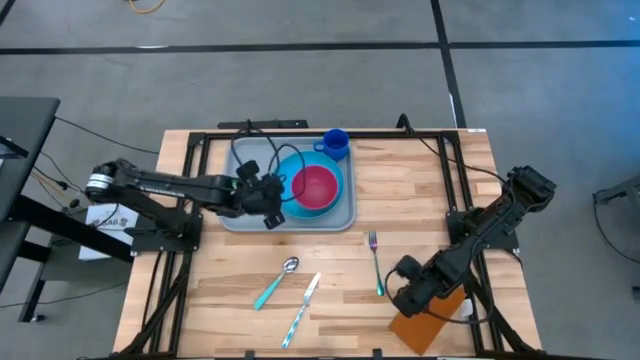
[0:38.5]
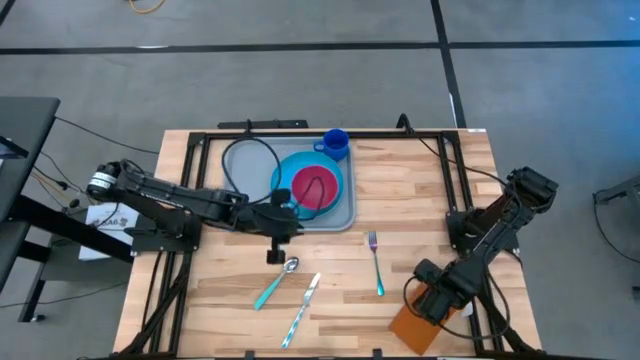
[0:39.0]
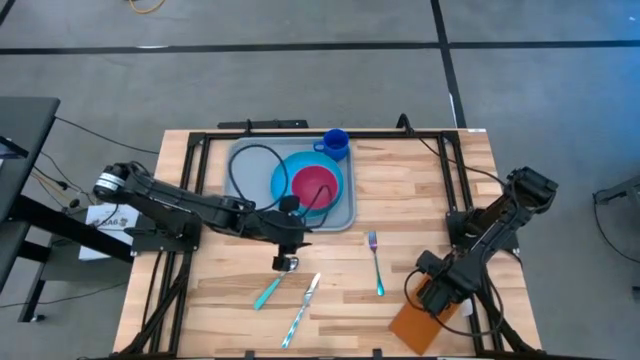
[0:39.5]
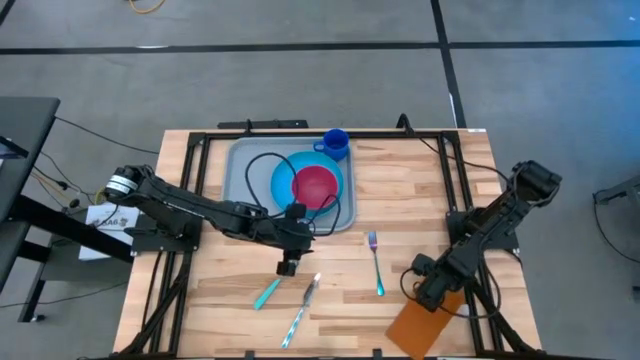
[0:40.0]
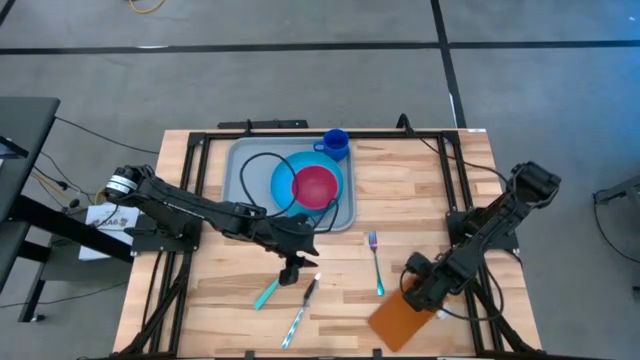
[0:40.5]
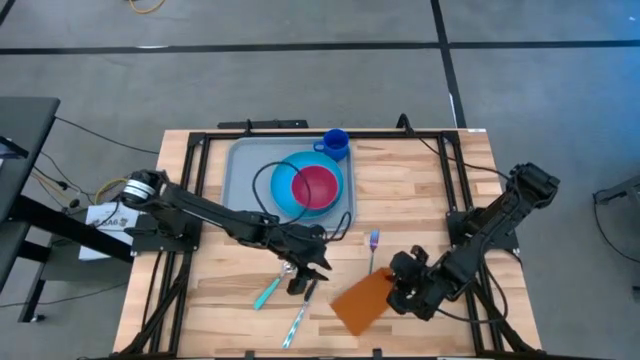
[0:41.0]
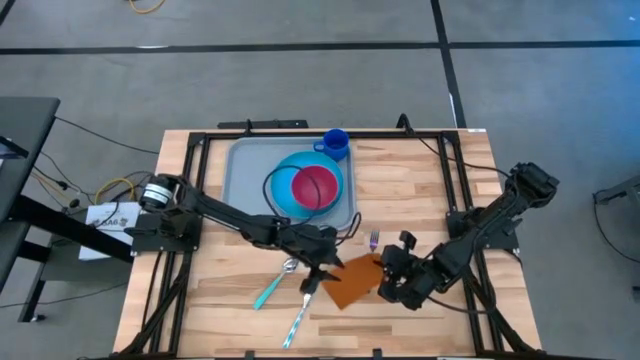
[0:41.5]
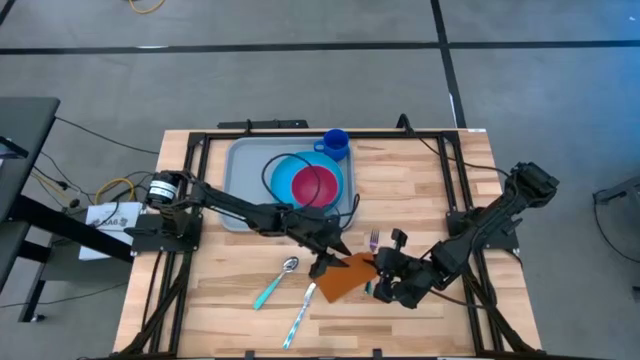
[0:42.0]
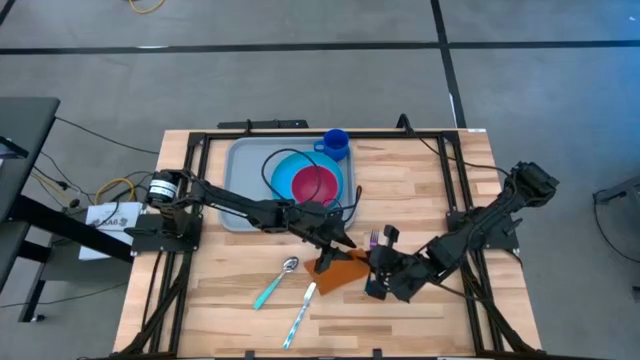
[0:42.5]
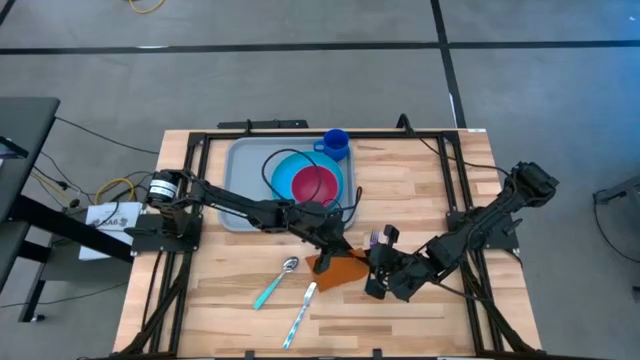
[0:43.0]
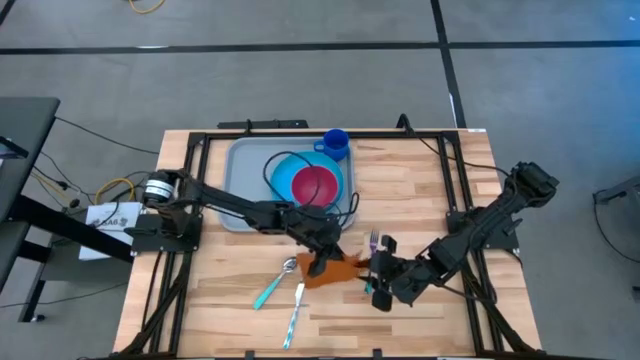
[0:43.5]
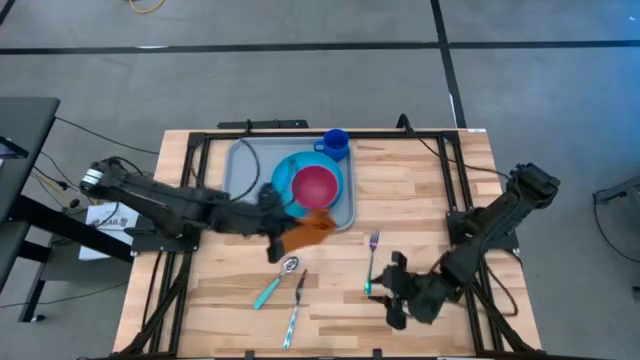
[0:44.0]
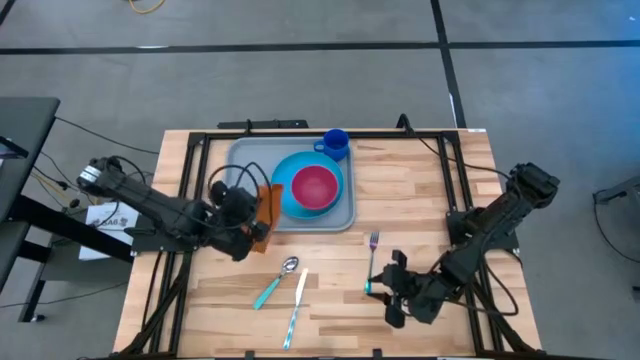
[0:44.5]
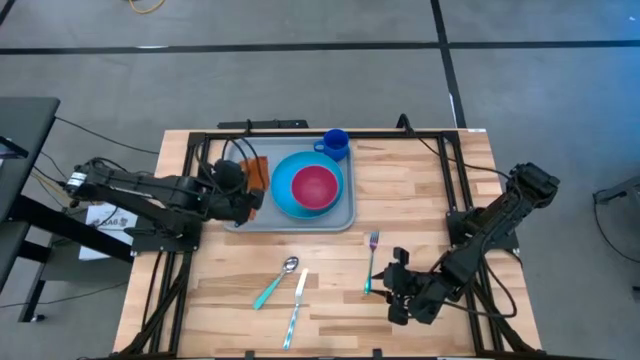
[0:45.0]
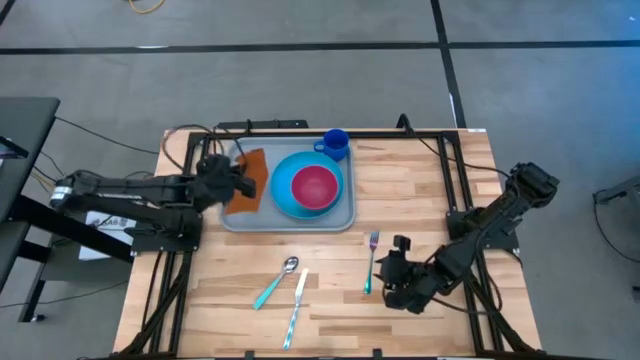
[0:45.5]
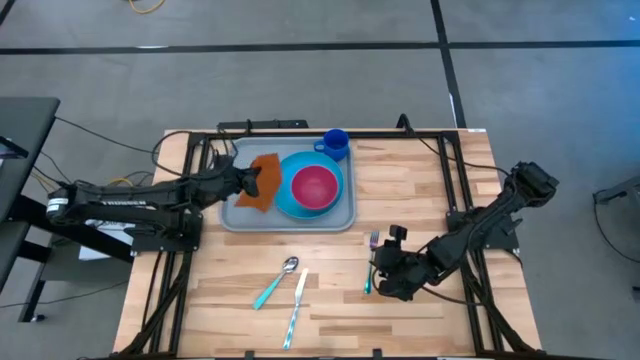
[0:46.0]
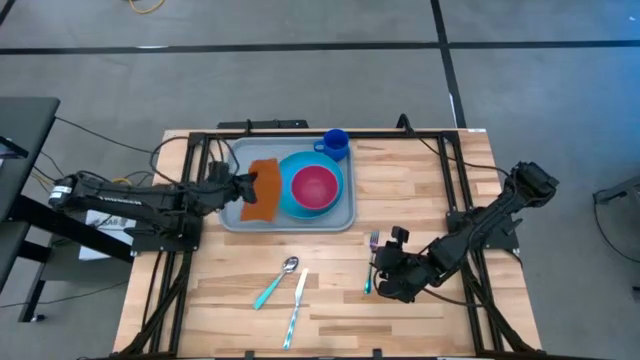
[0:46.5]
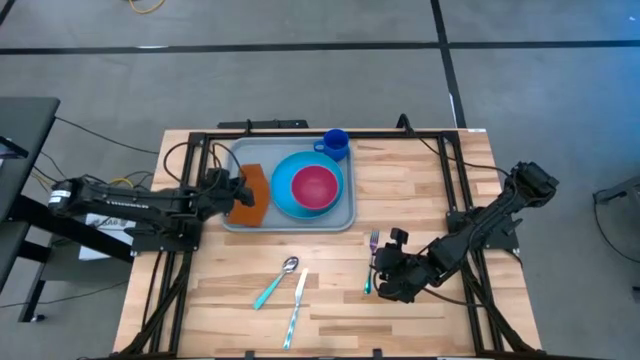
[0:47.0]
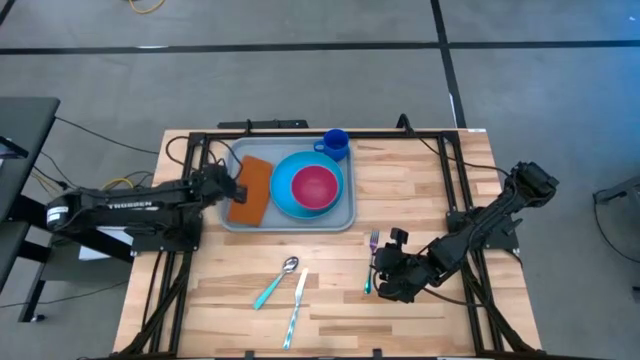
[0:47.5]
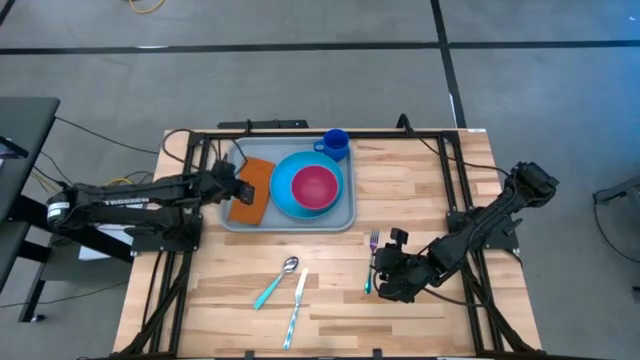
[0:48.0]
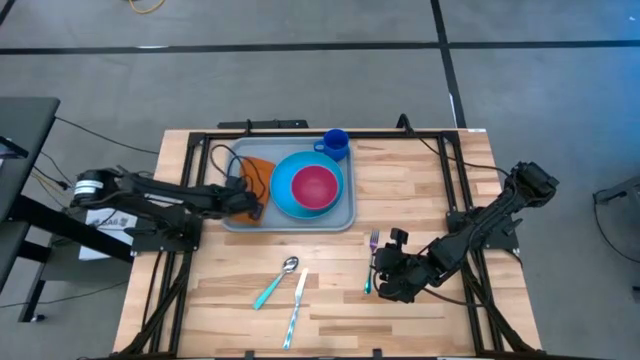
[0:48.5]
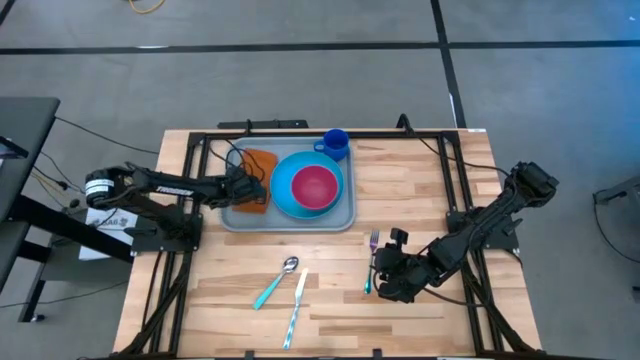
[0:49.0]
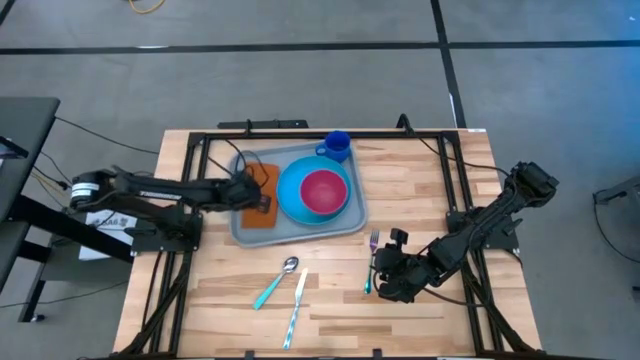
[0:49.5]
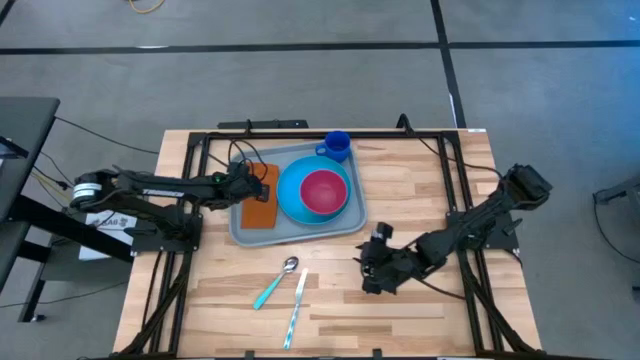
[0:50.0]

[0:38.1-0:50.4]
Task: Set up tray
Put the brown napkin on the gray tray

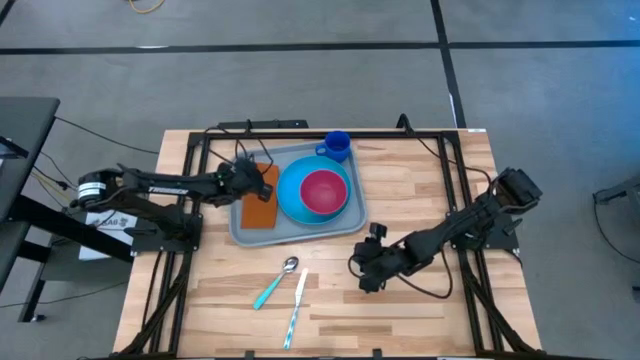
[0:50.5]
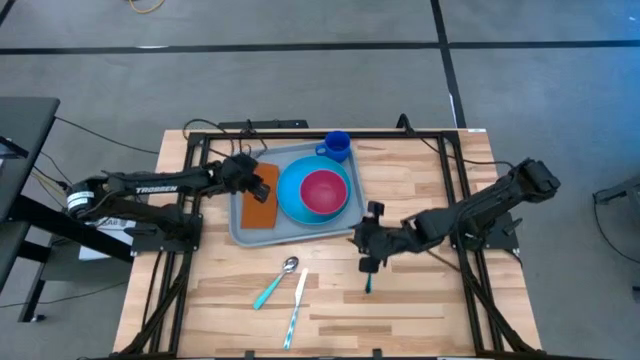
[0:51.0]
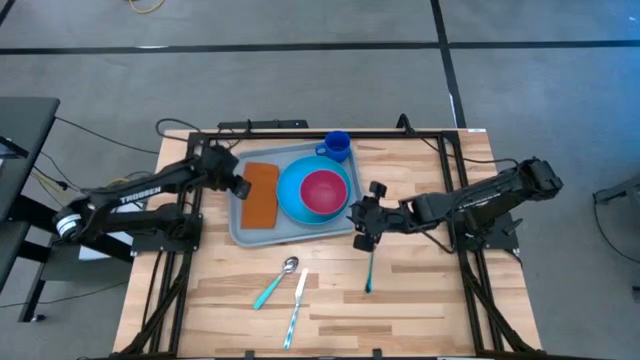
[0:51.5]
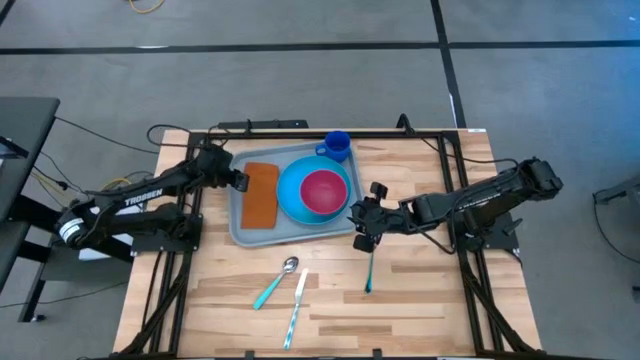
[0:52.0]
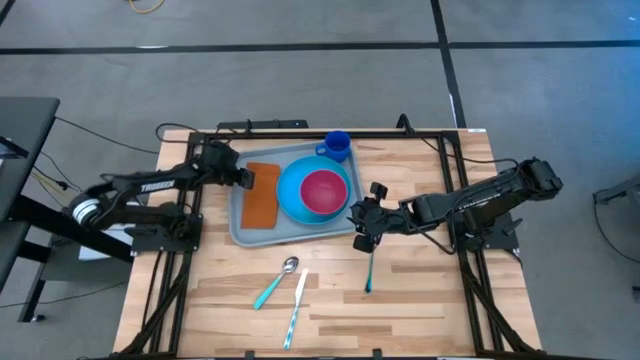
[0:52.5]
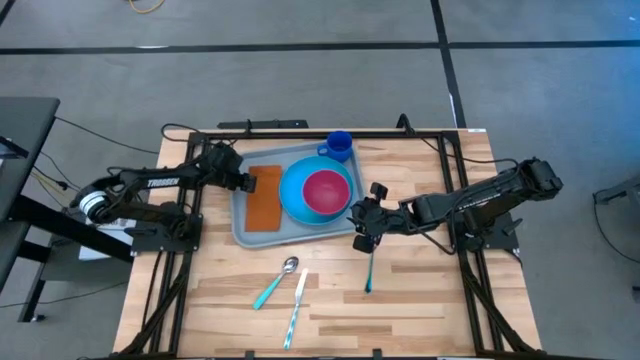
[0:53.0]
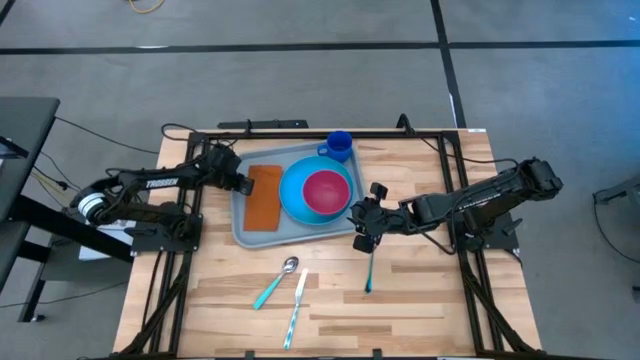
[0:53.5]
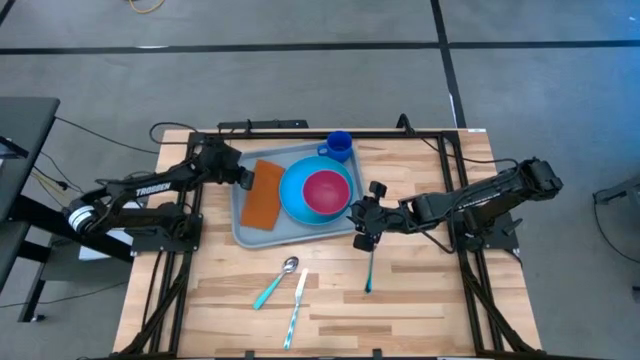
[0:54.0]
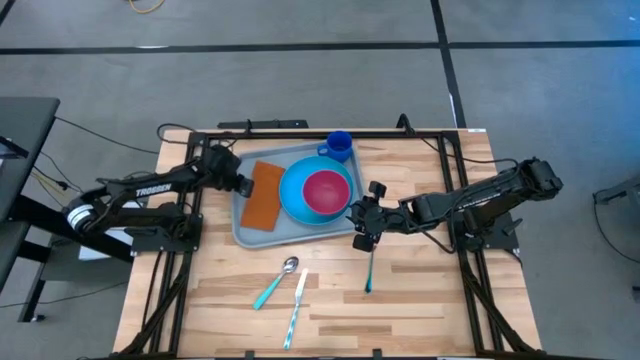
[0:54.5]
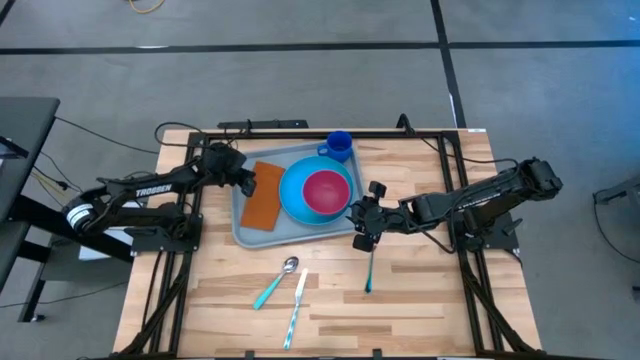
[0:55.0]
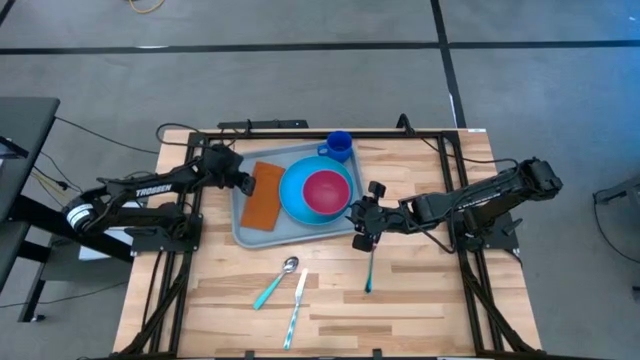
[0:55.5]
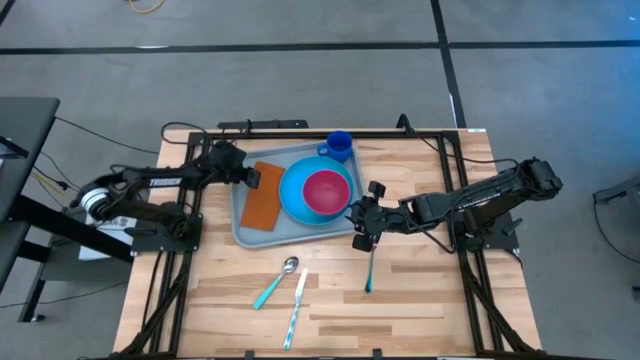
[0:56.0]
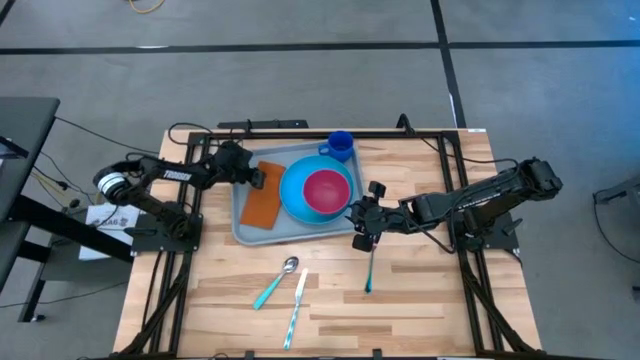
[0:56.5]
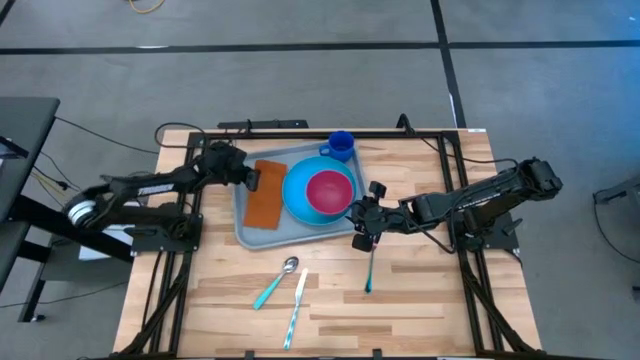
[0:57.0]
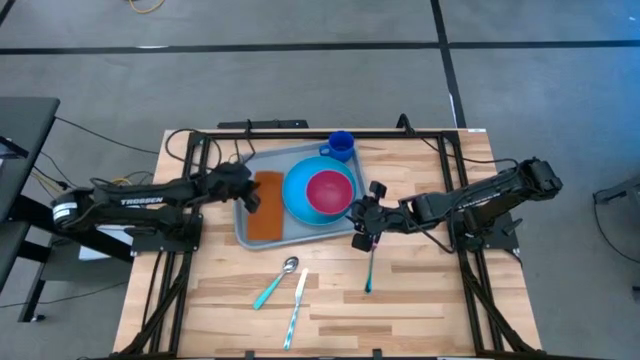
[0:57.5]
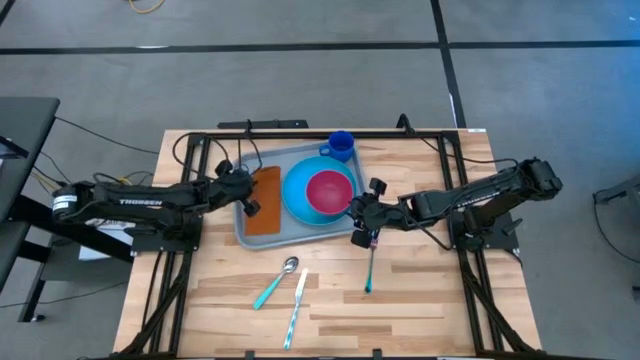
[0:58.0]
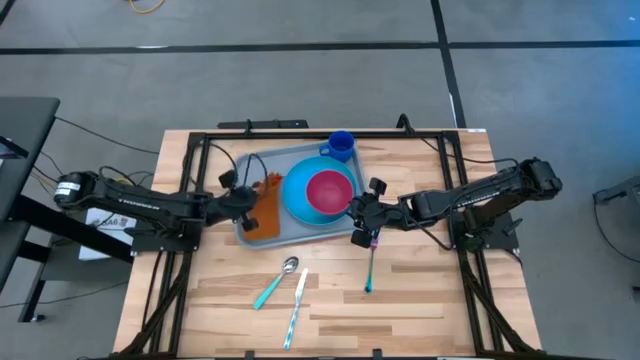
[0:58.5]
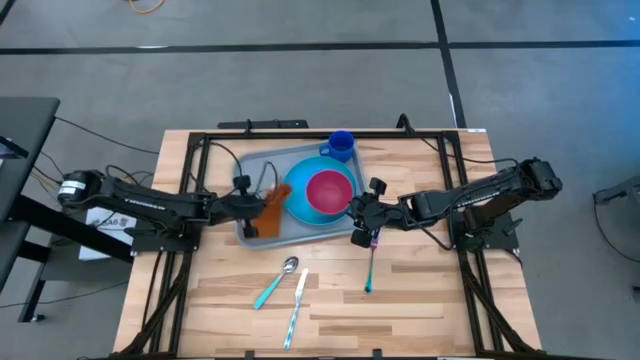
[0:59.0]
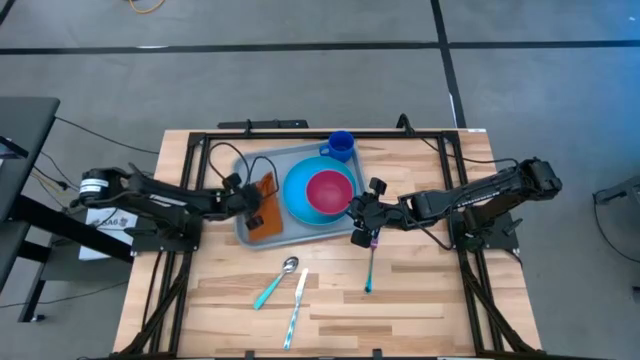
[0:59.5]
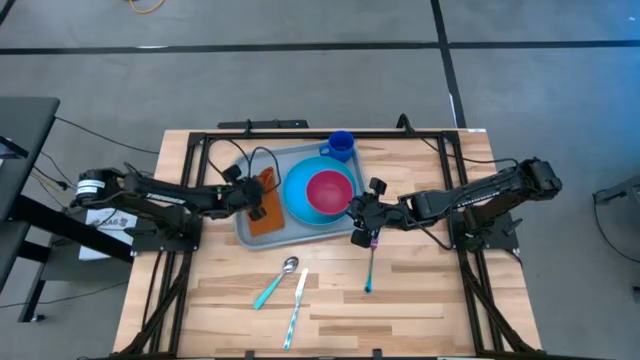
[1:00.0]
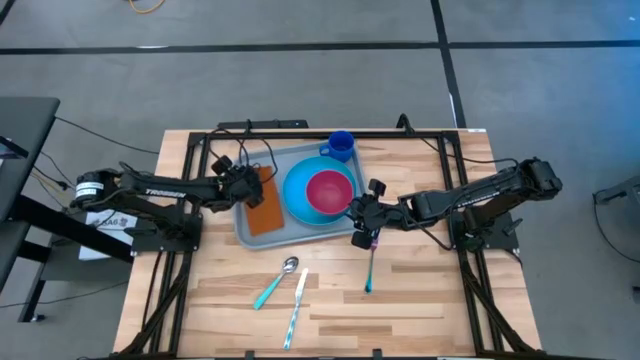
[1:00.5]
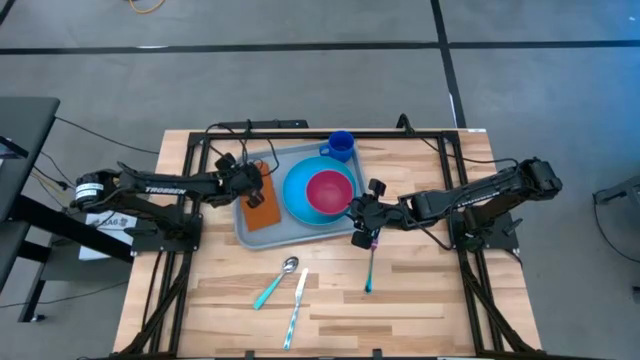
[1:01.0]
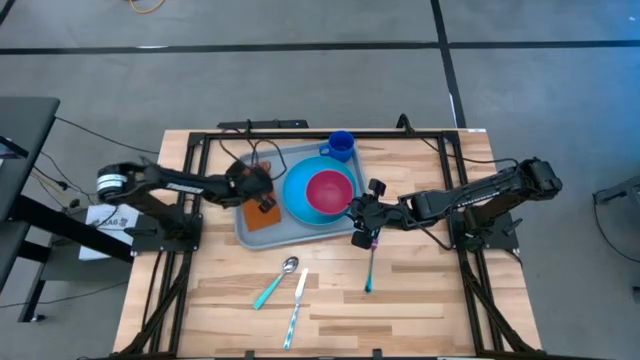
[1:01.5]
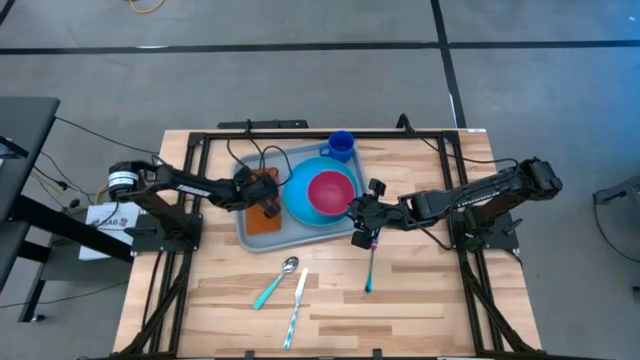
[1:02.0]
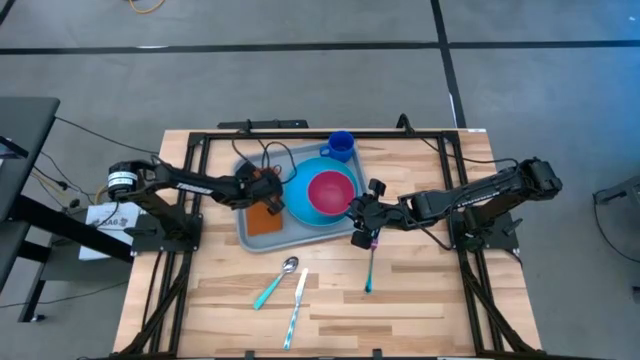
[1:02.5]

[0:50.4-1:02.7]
Put the brown napkin on the gray tray
